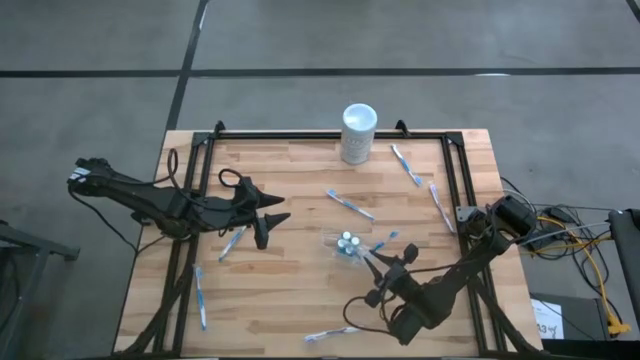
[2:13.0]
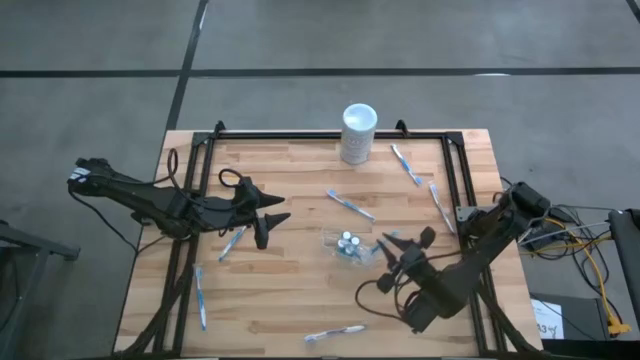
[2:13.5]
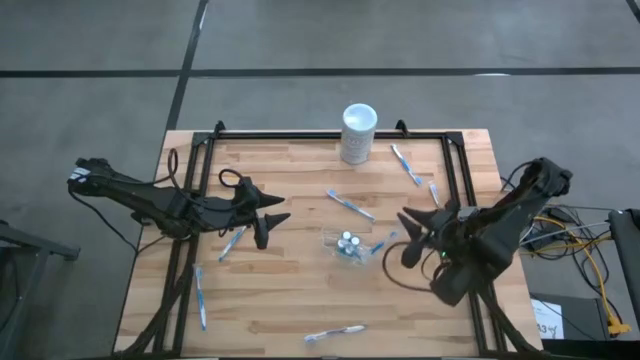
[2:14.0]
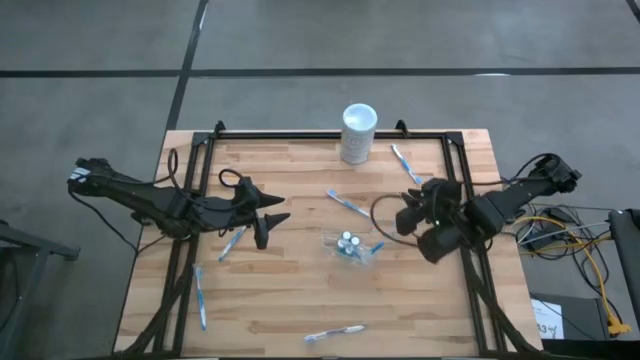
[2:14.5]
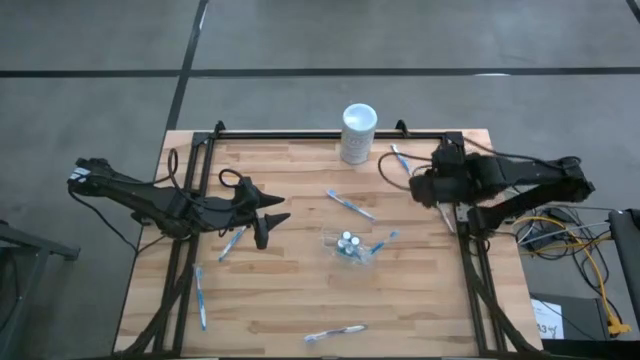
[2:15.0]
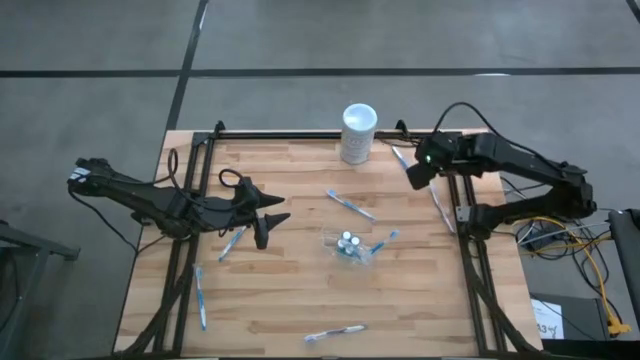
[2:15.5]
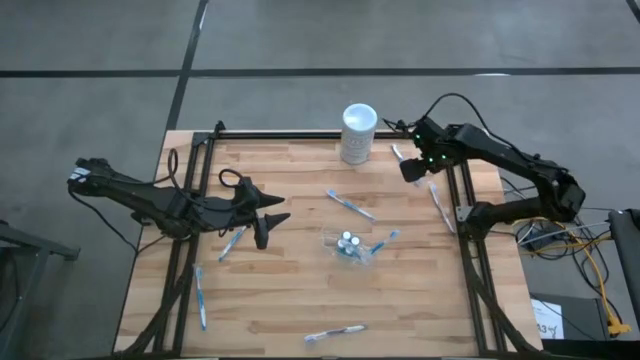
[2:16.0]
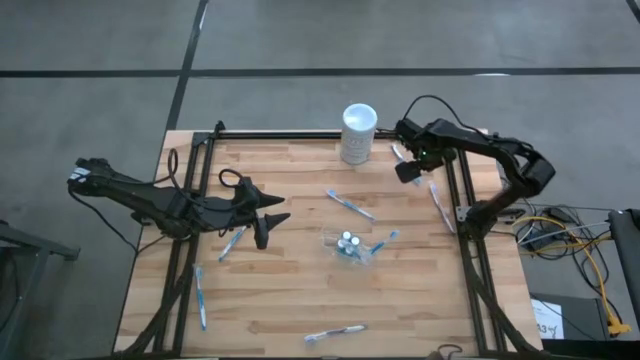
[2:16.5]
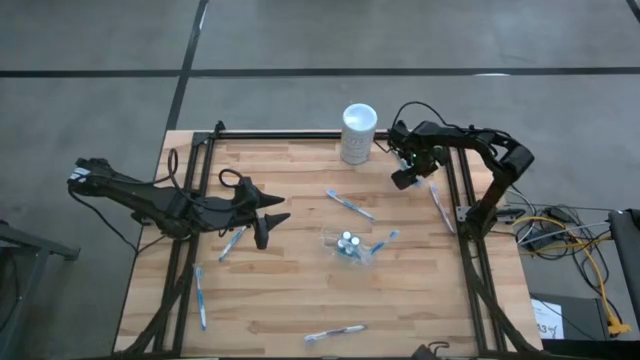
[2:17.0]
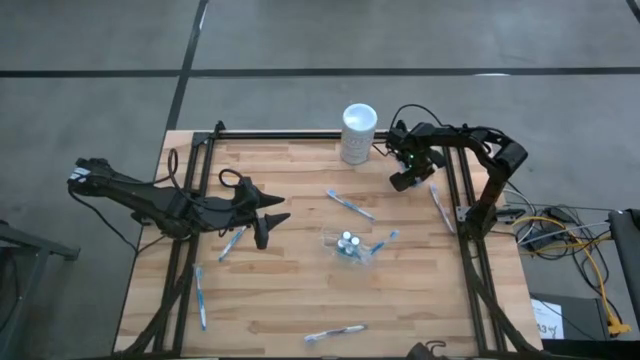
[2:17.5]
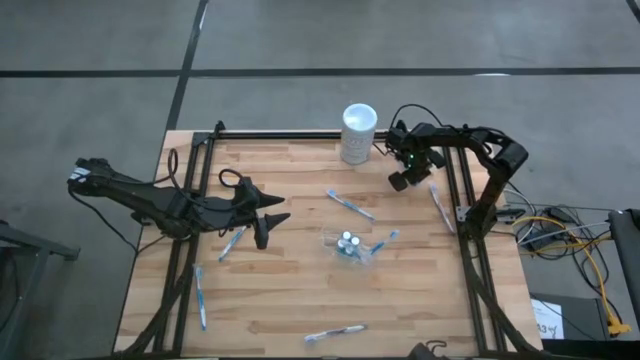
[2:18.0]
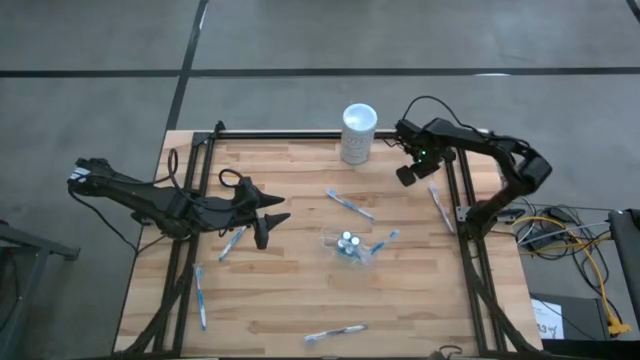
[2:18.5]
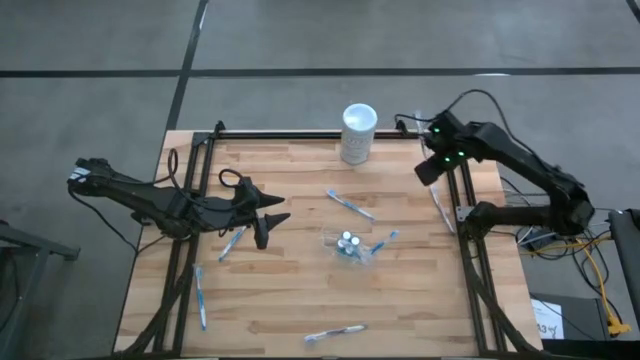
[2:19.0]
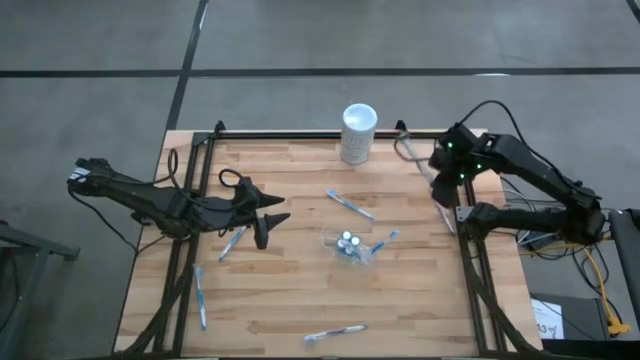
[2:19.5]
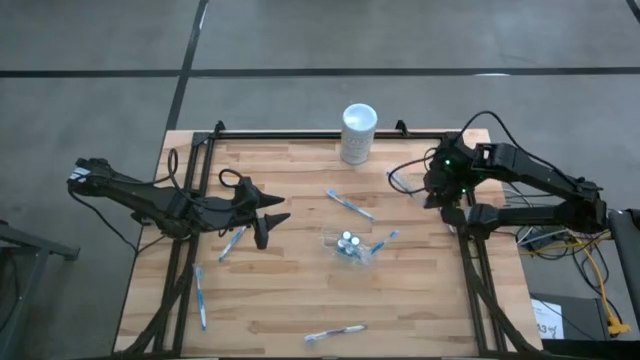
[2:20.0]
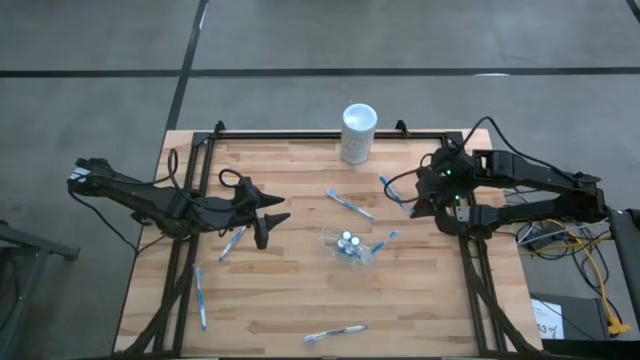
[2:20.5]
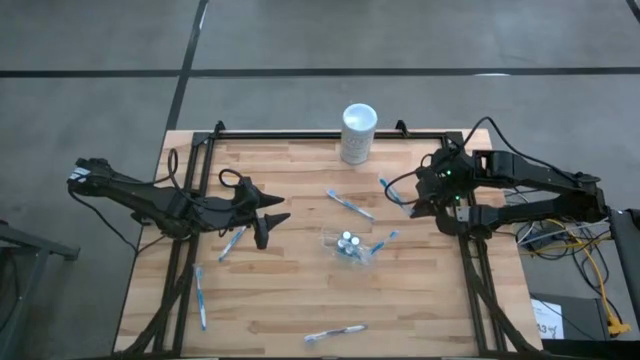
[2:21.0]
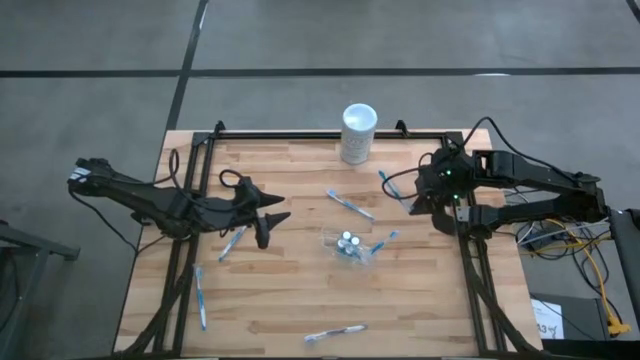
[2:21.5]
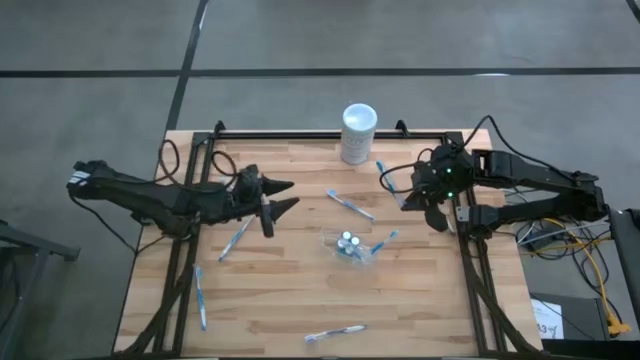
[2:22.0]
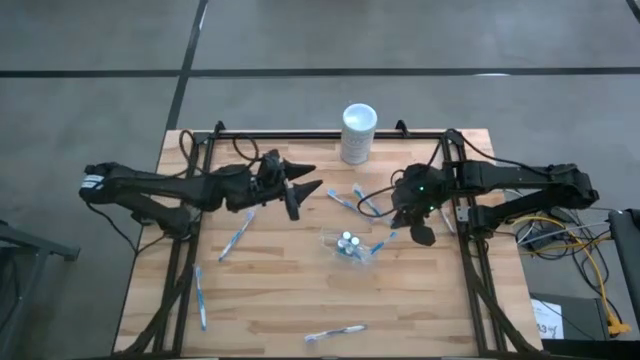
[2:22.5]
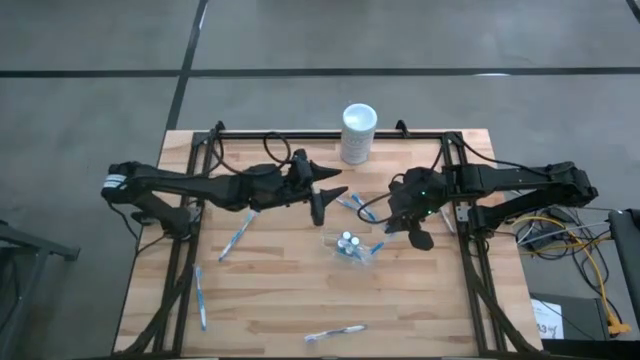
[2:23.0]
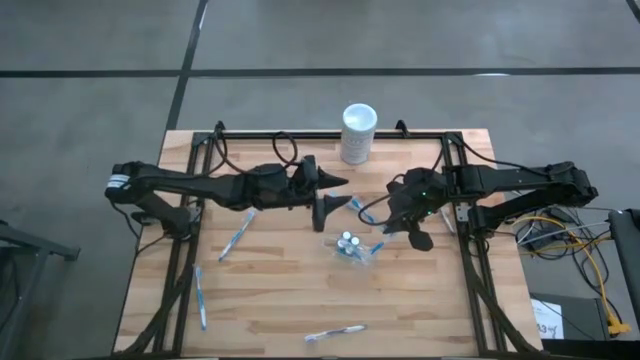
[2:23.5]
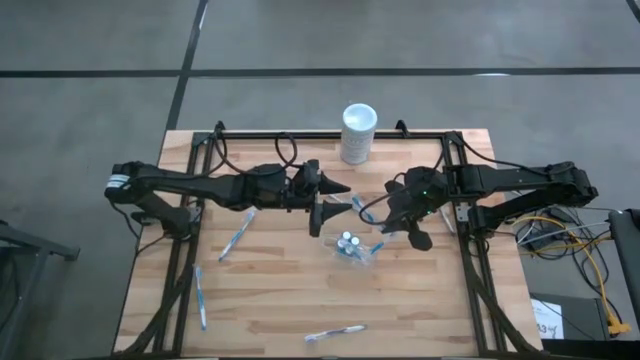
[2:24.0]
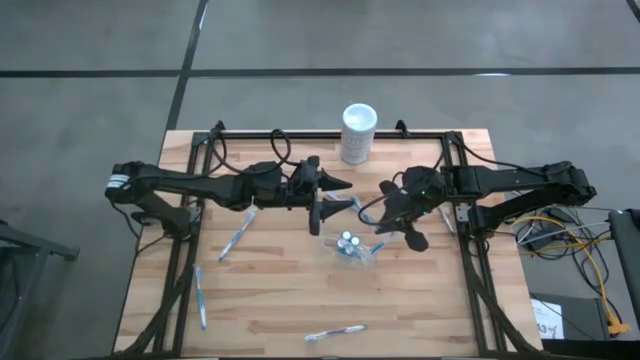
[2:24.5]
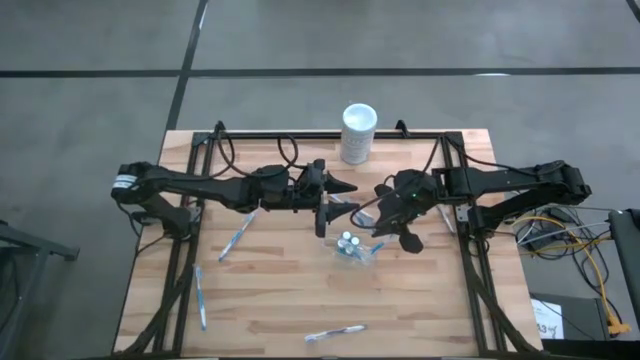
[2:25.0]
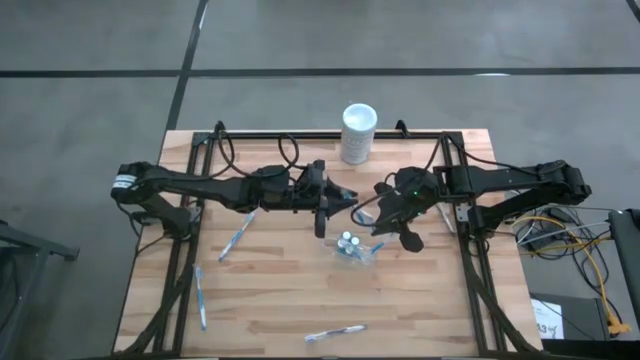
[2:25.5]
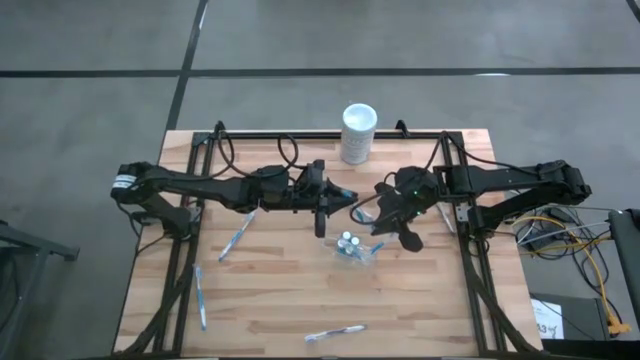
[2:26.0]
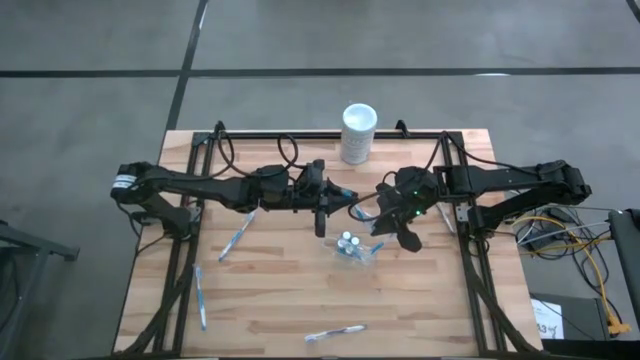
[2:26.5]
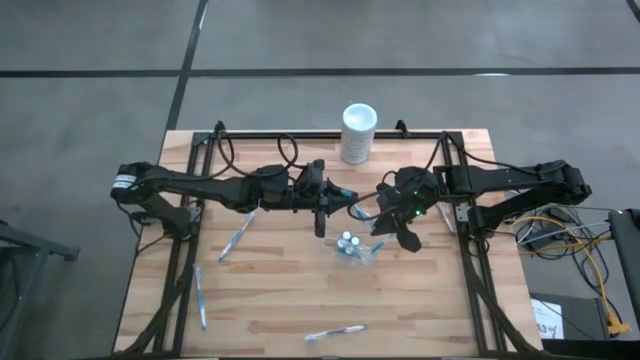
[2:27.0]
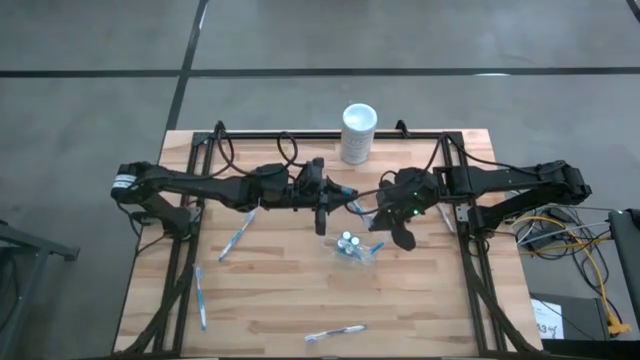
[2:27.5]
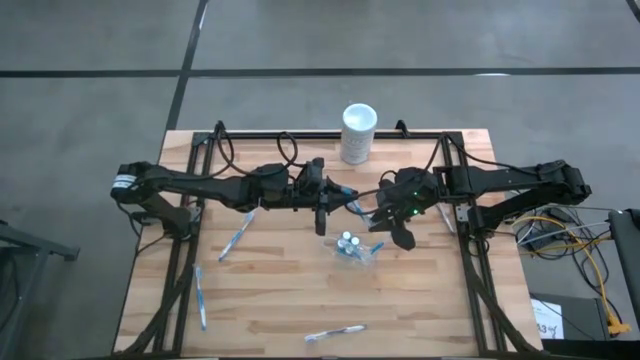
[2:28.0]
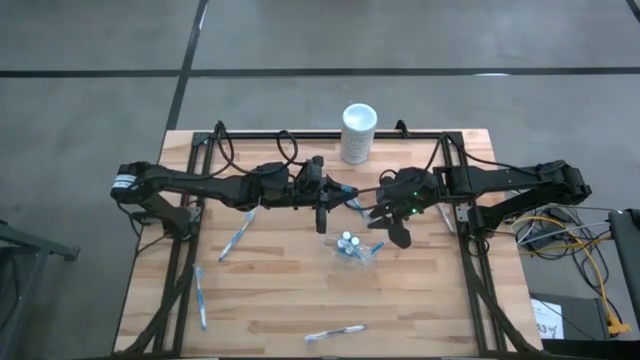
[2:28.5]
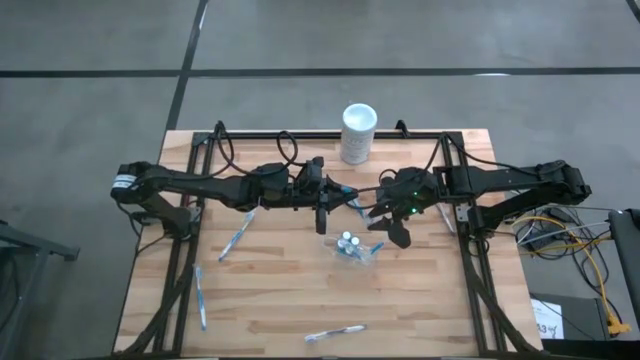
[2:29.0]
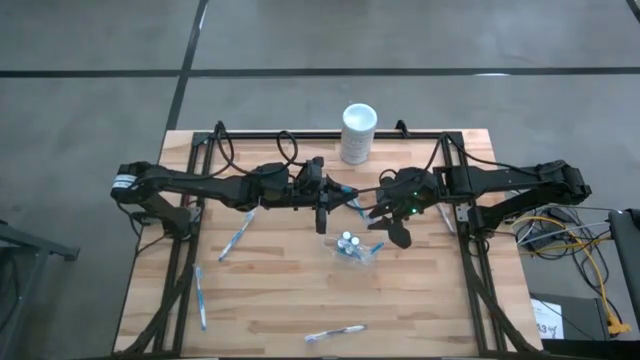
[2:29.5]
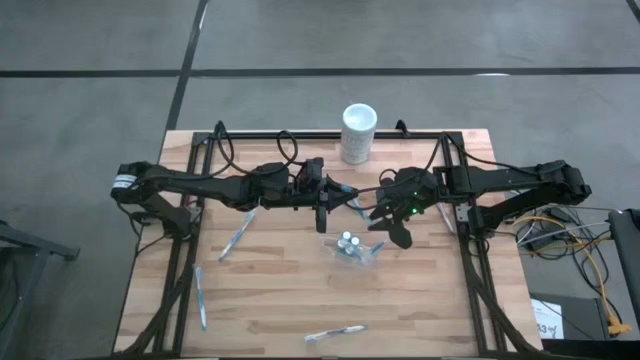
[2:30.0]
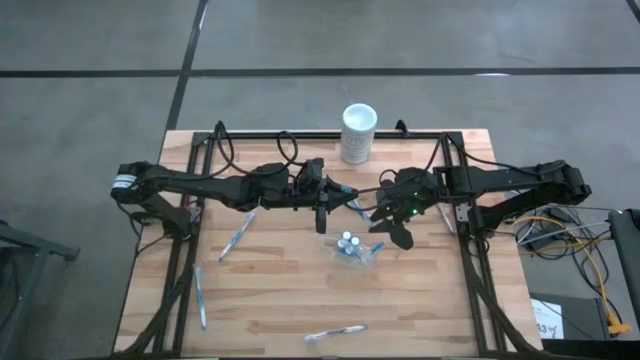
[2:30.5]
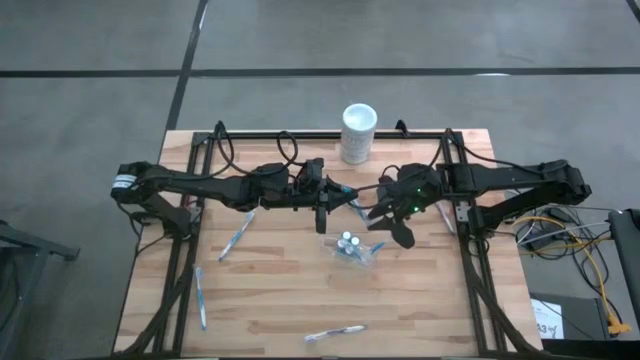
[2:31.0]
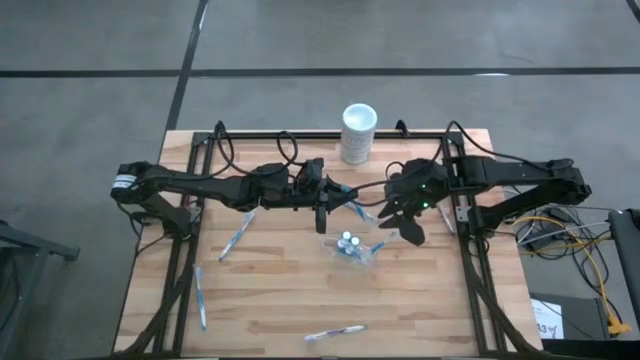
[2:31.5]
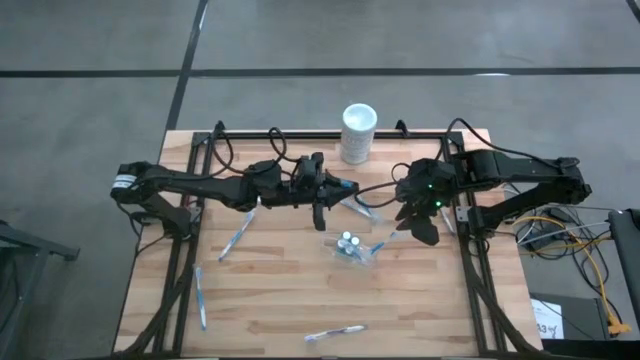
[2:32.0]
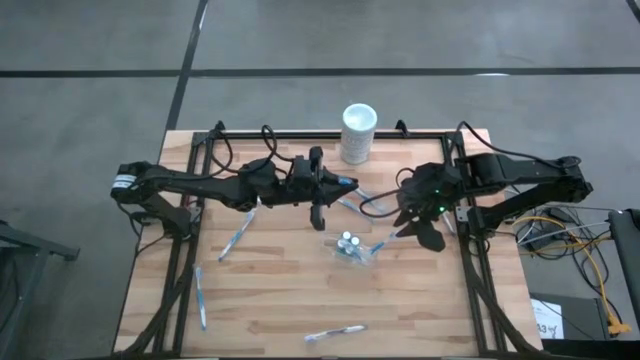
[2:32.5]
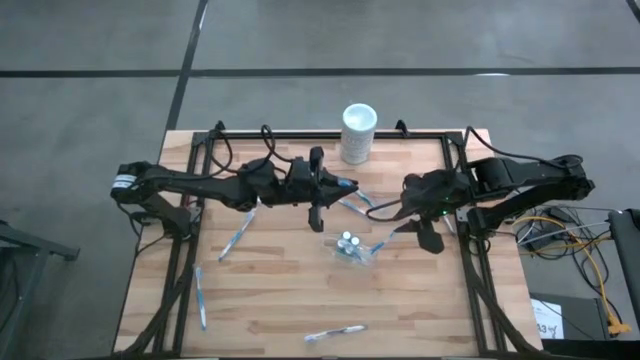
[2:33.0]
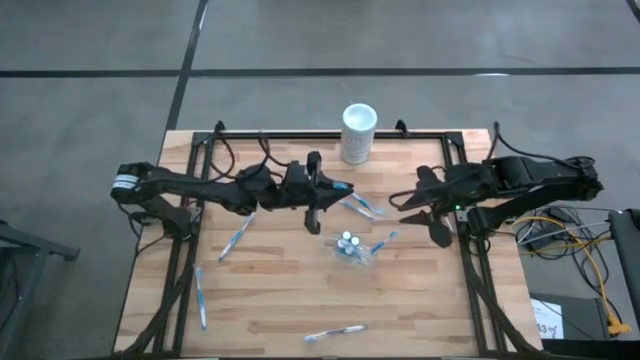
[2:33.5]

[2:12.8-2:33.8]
Task: Pick & Place toothbrushing station
Put the blue toothbrush into the transparent organizer
